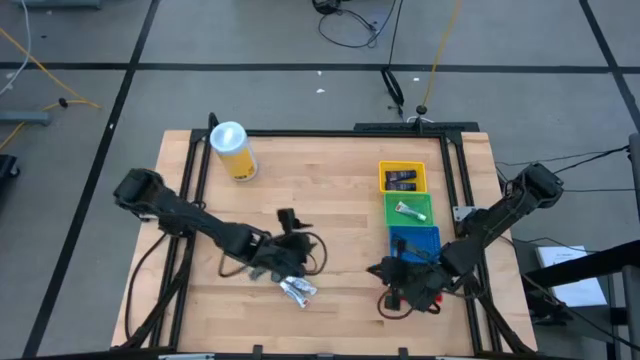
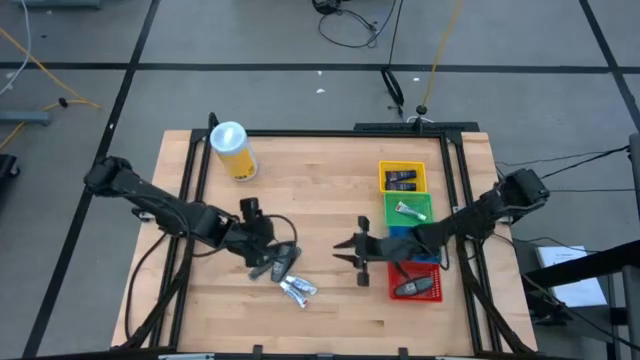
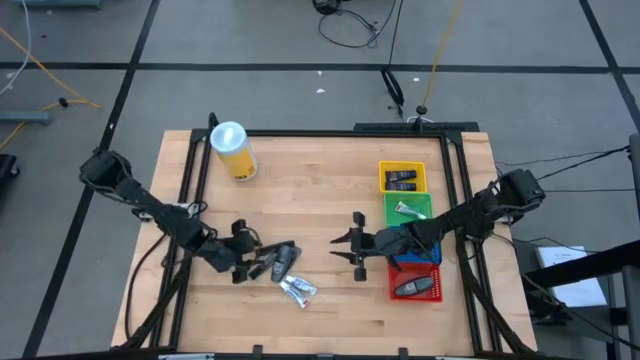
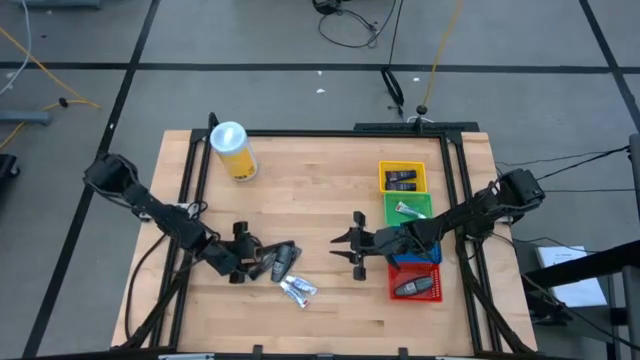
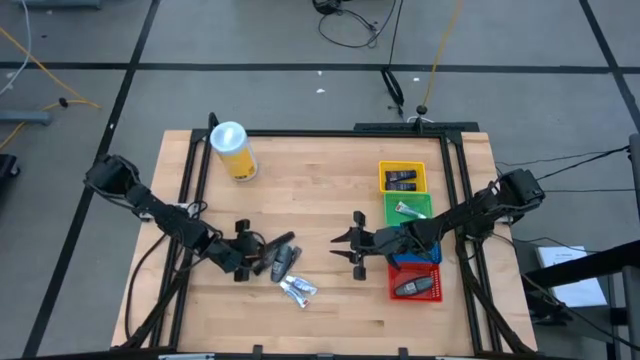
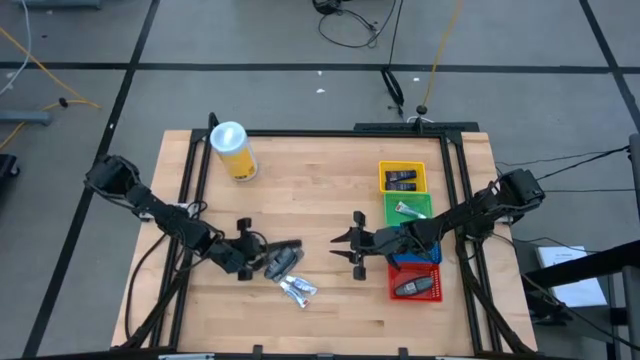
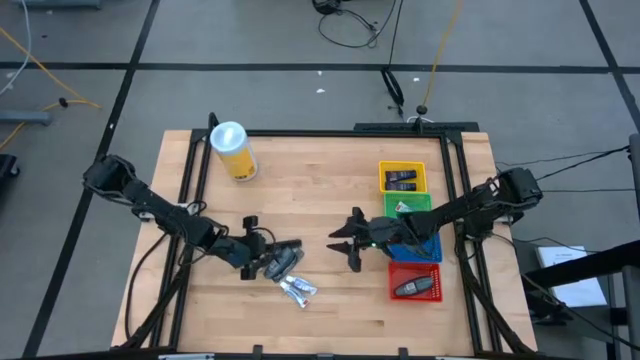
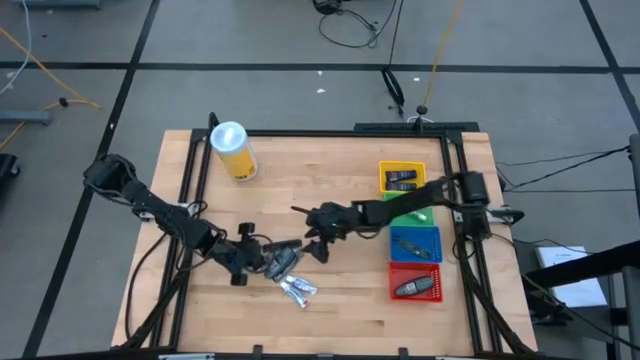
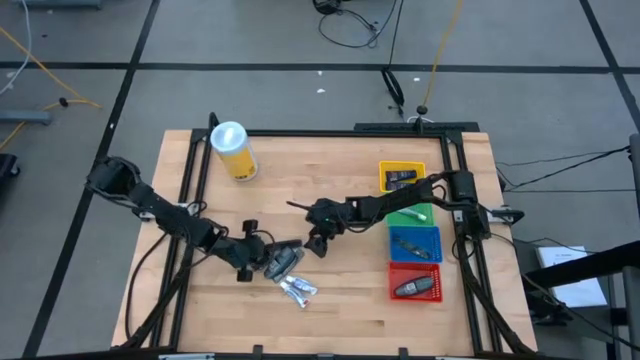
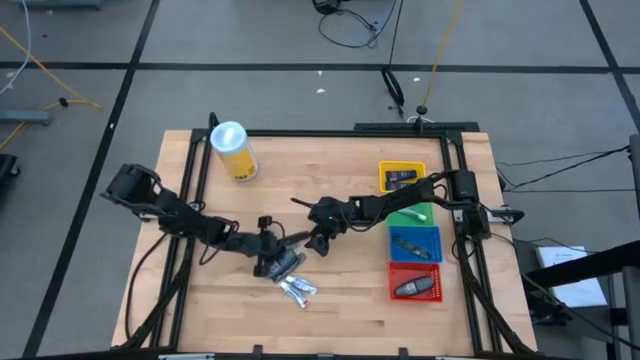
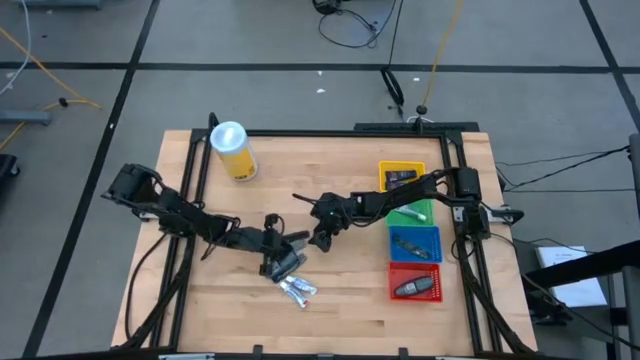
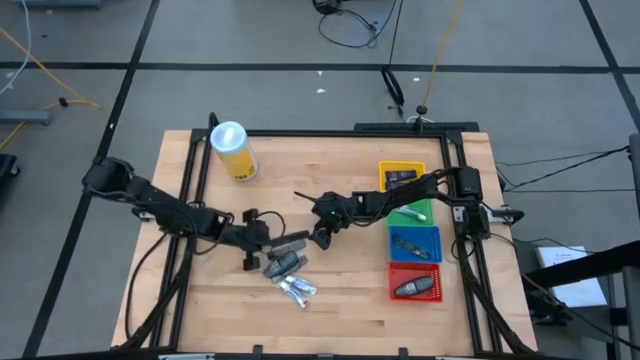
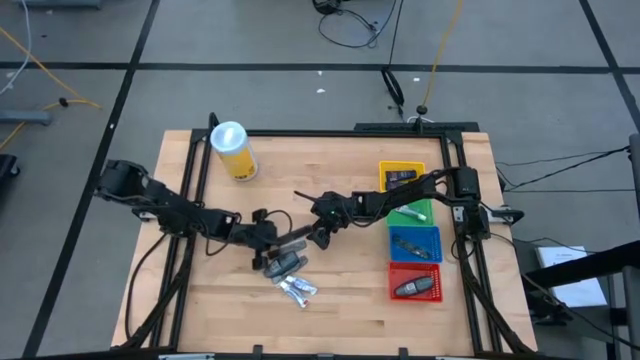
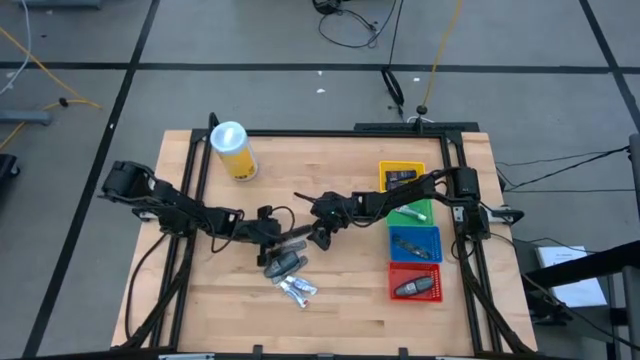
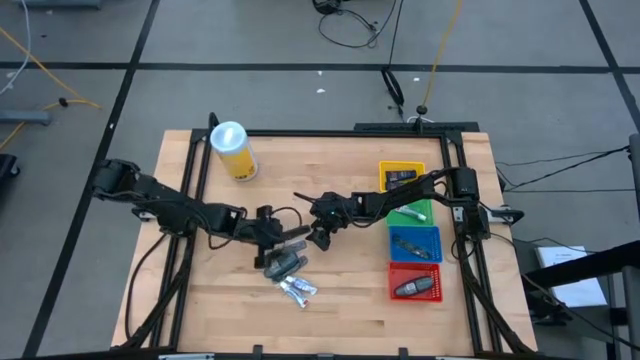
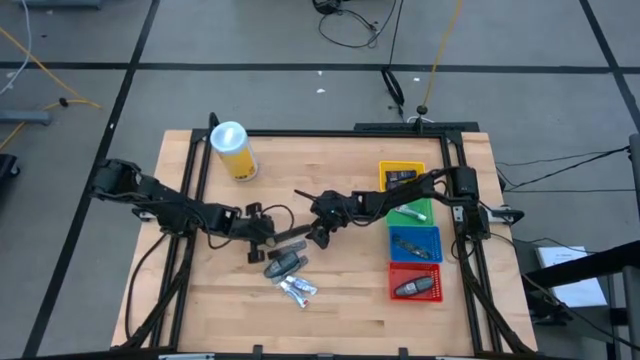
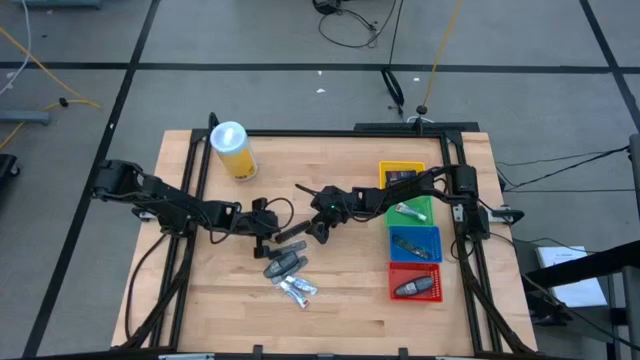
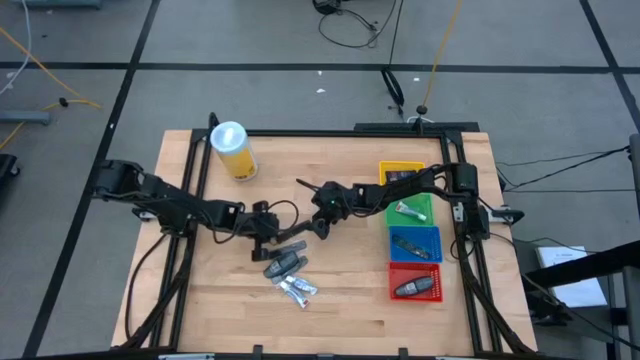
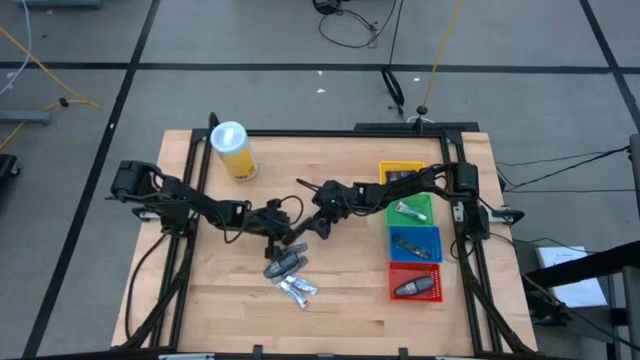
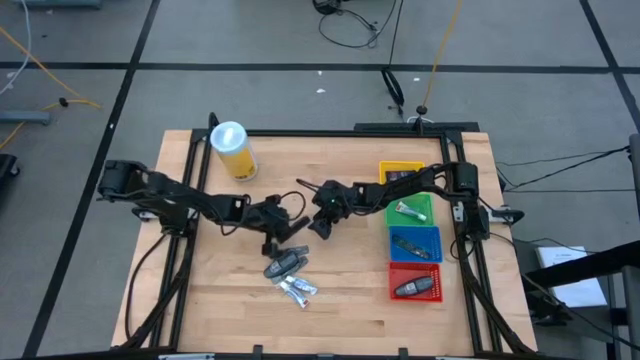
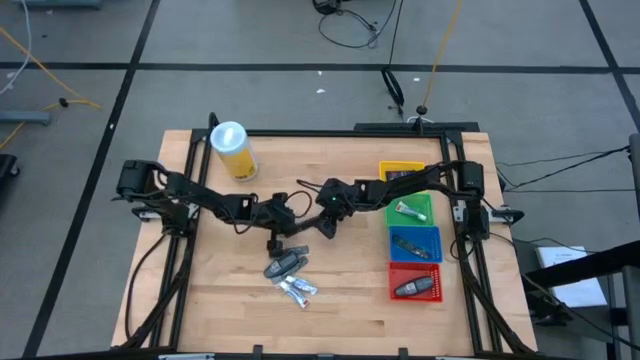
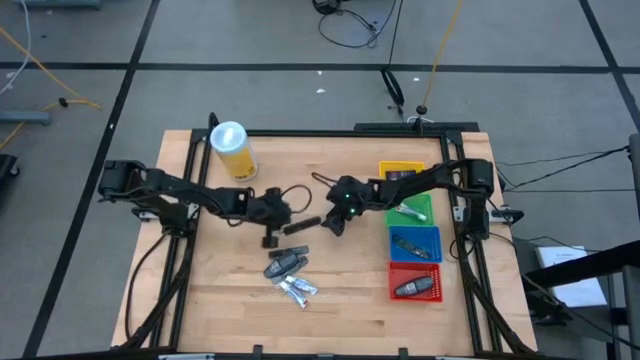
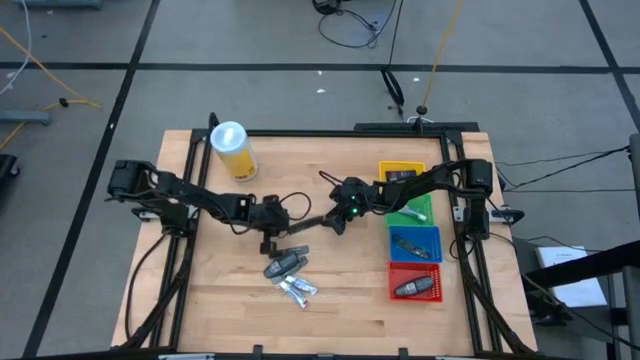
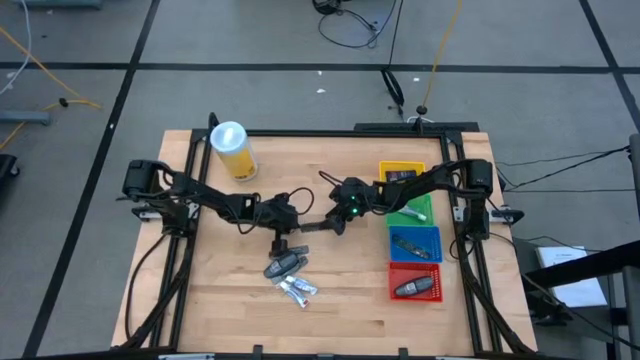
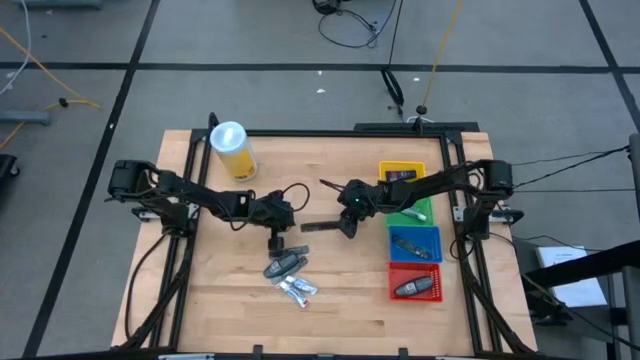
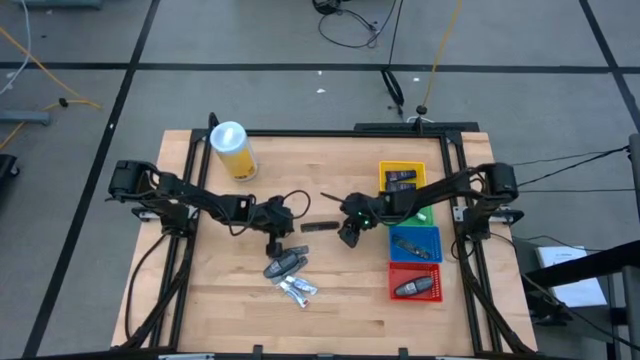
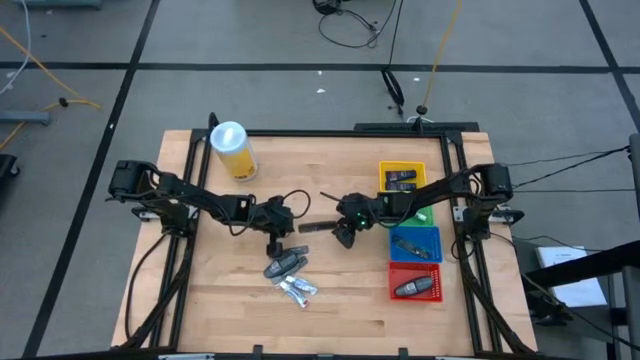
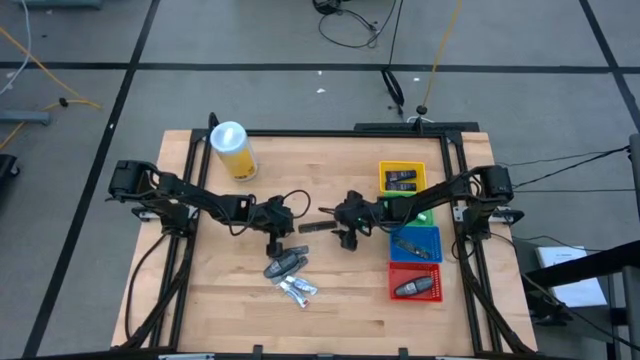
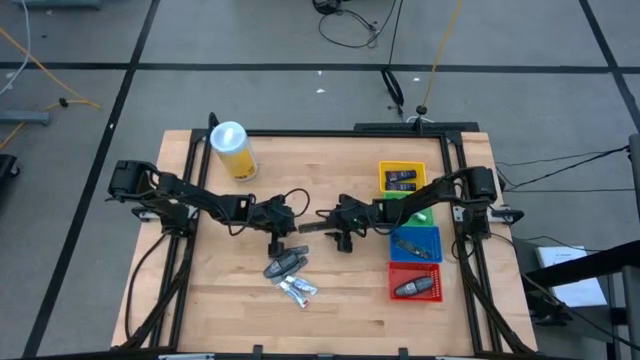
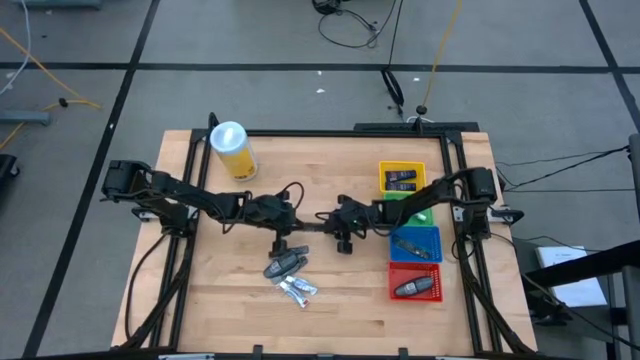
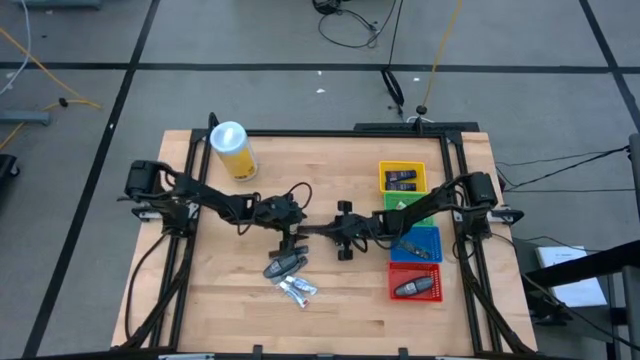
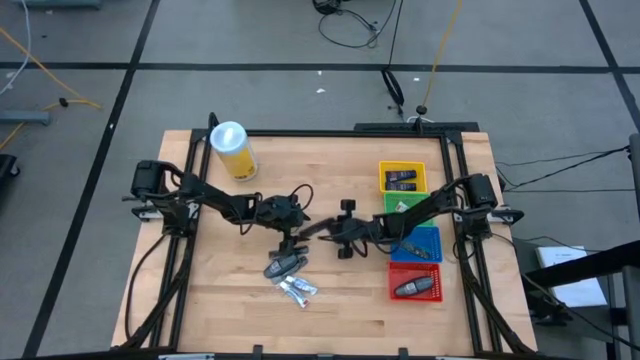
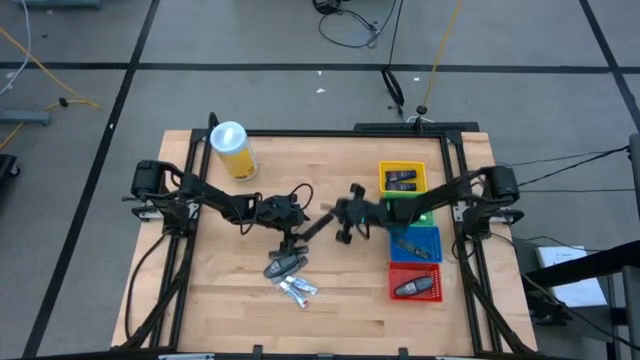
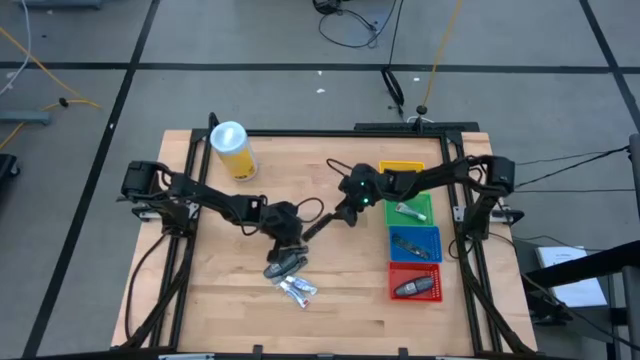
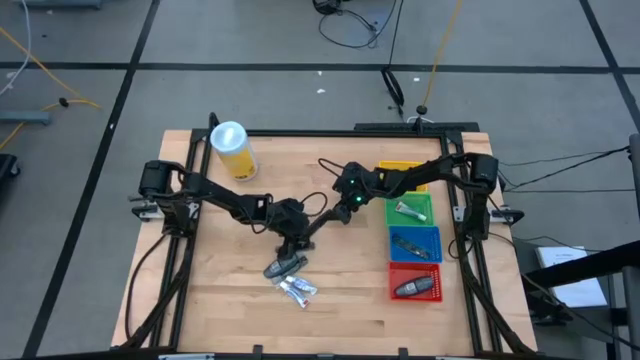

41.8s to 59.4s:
Task: Pick & Place Travel size toiletries
Put the black hair comb into the blue bin

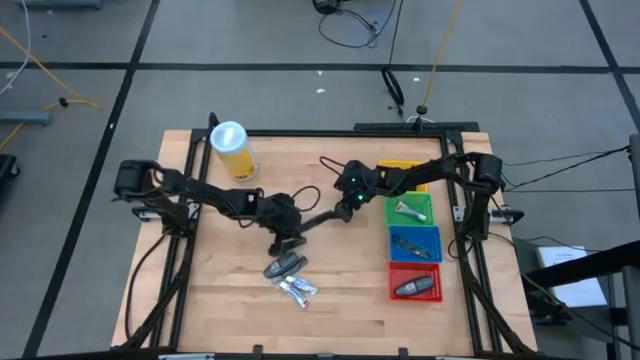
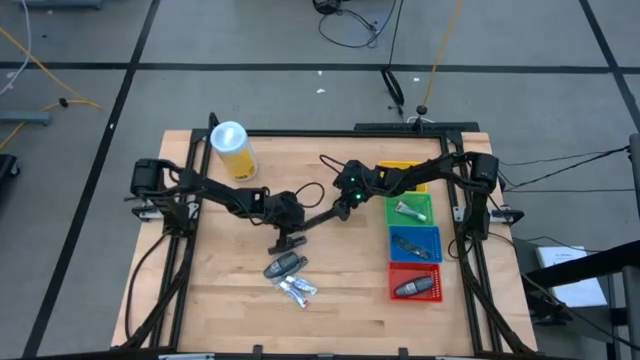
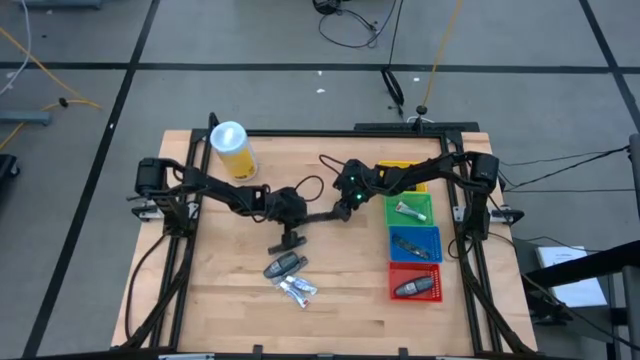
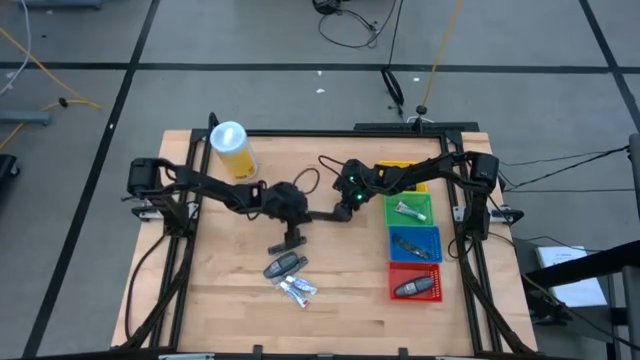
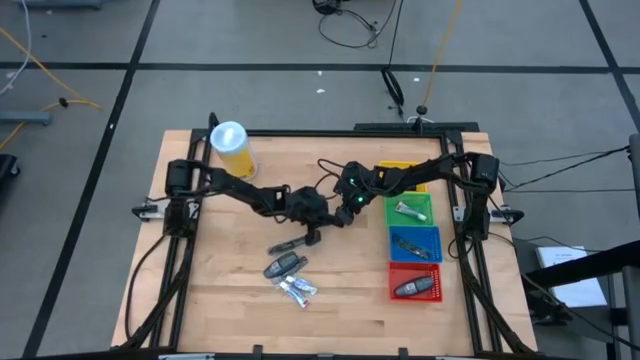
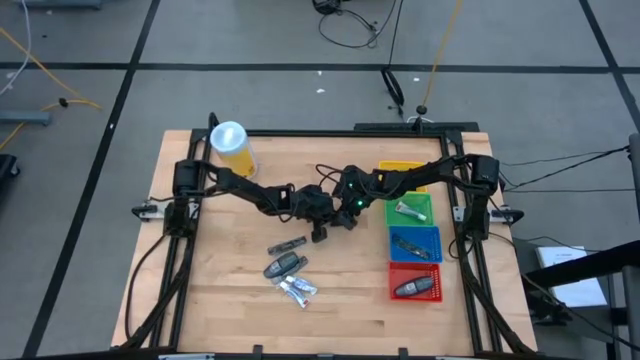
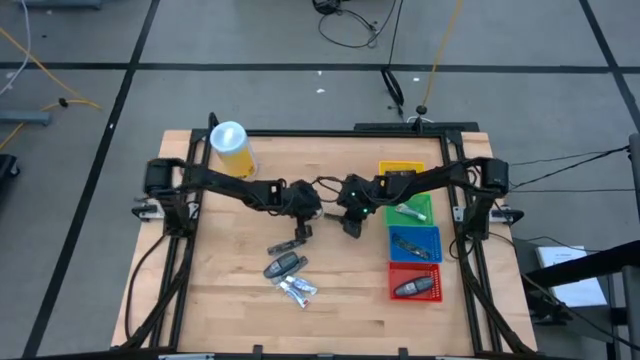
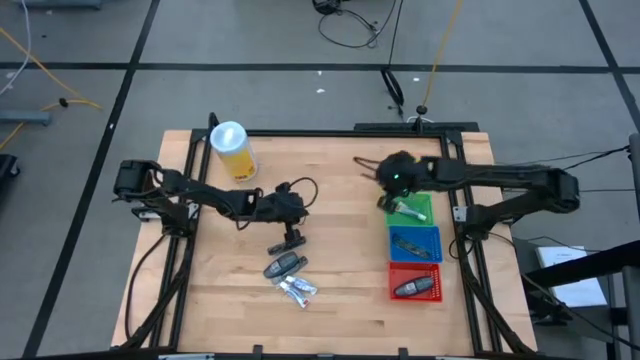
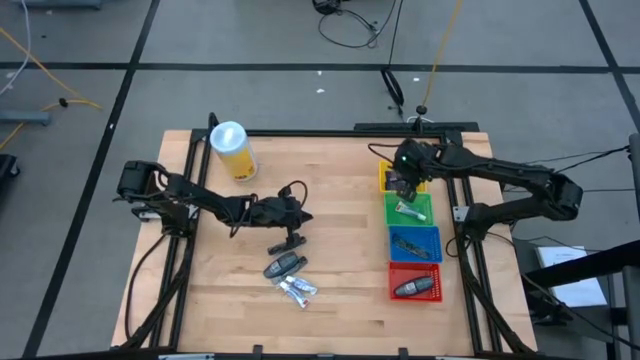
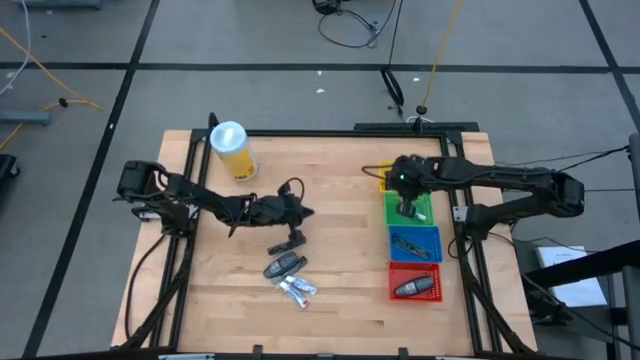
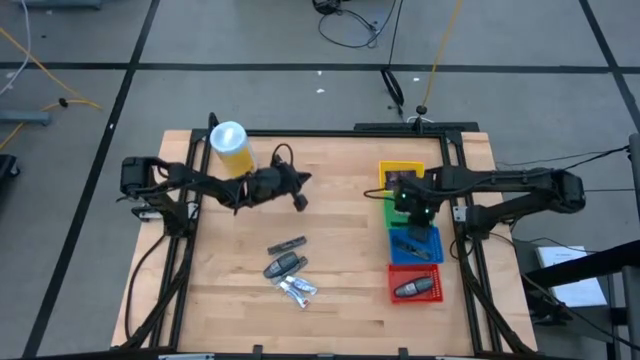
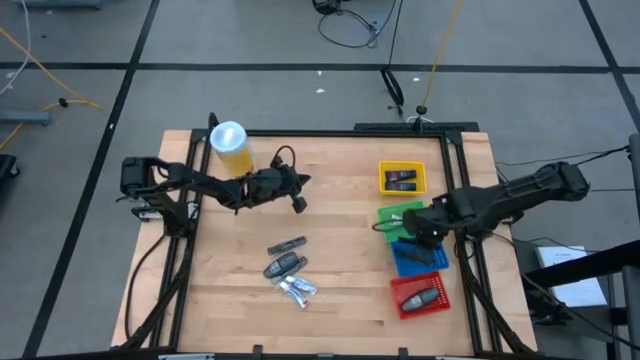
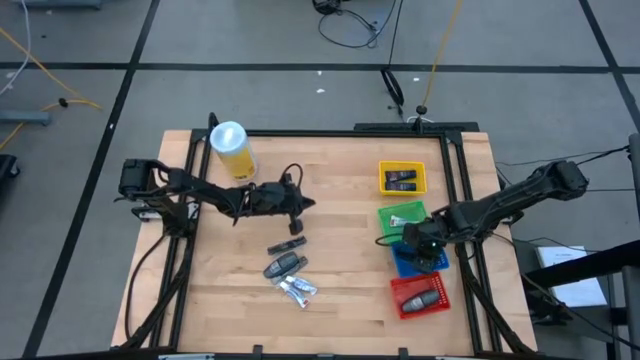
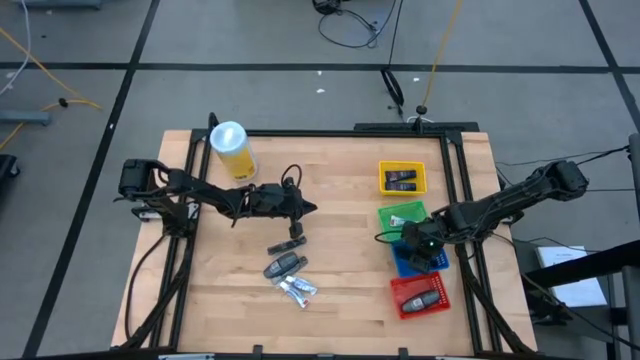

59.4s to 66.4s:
Put the black hair comb into the blue bin
